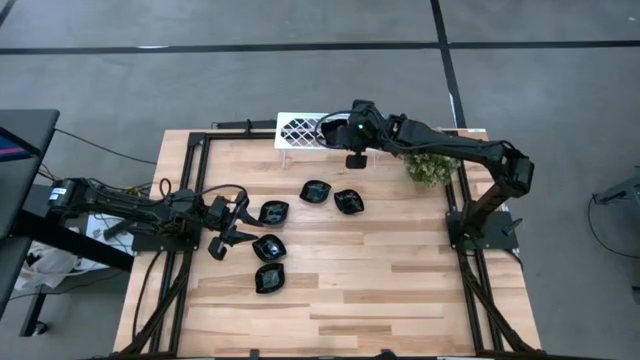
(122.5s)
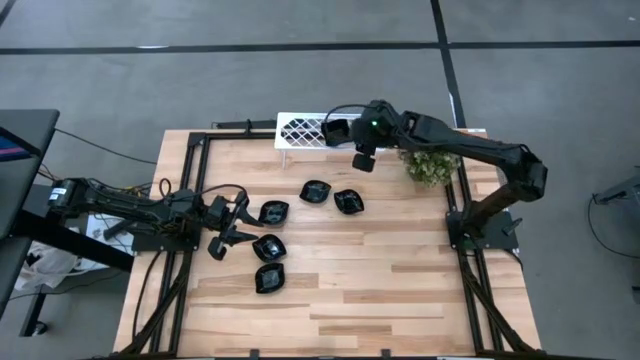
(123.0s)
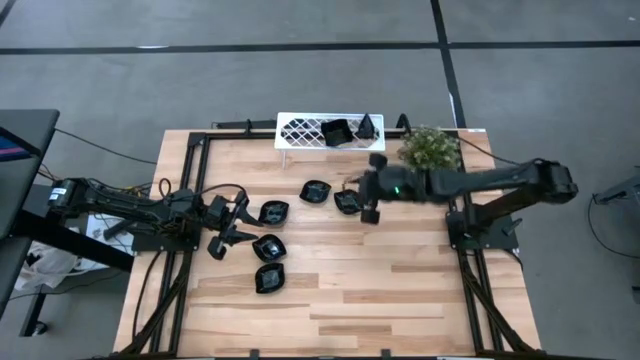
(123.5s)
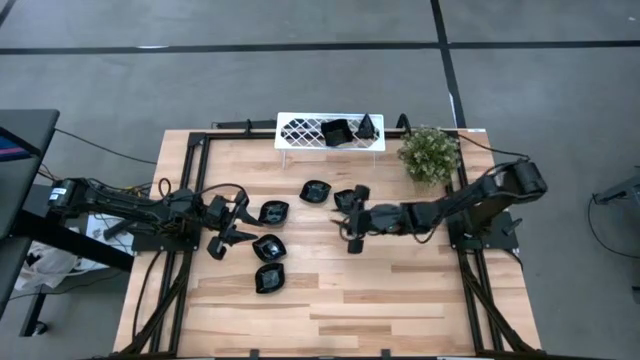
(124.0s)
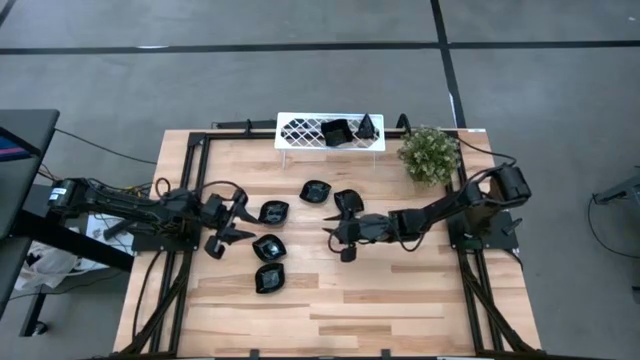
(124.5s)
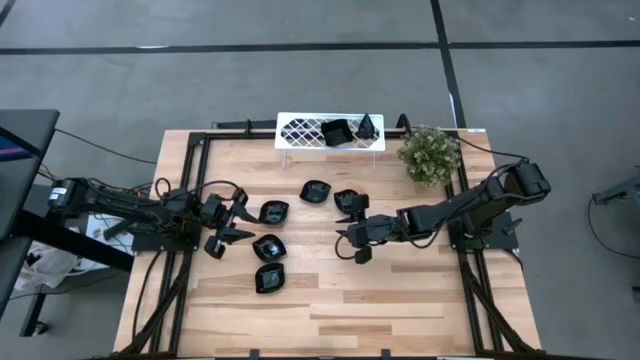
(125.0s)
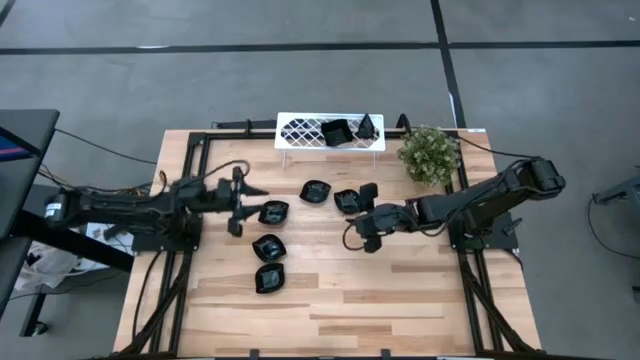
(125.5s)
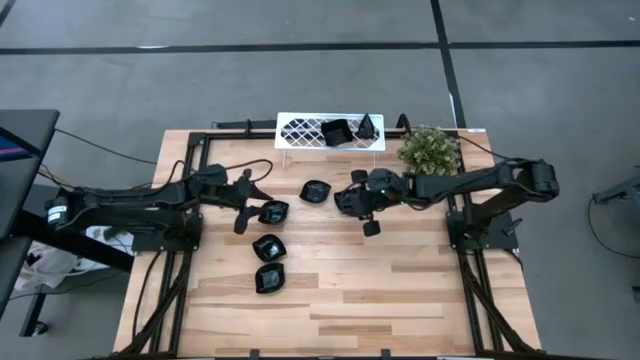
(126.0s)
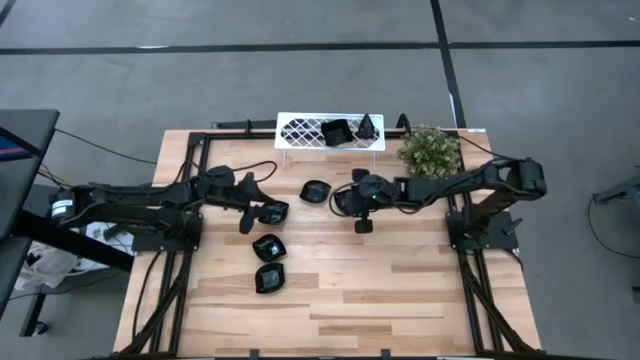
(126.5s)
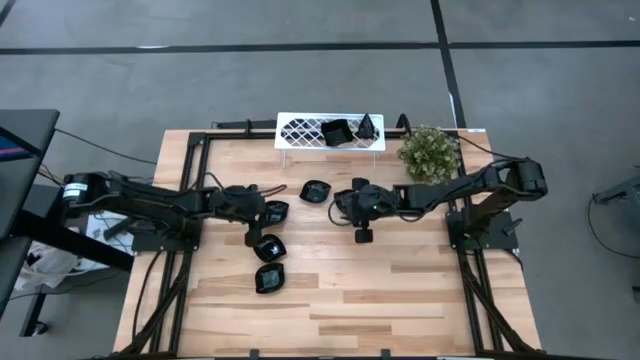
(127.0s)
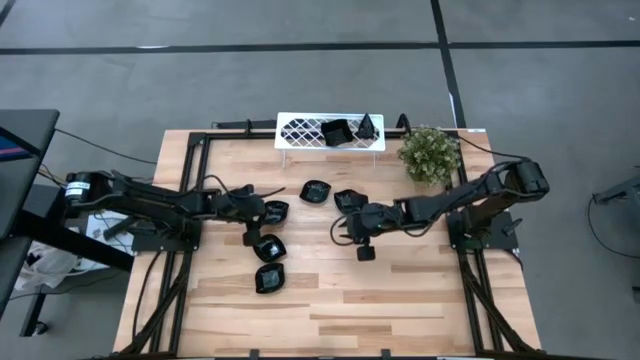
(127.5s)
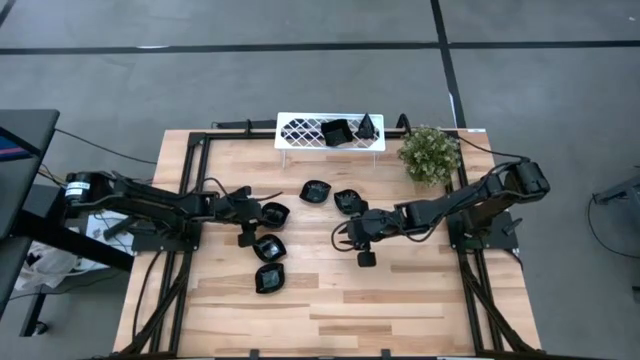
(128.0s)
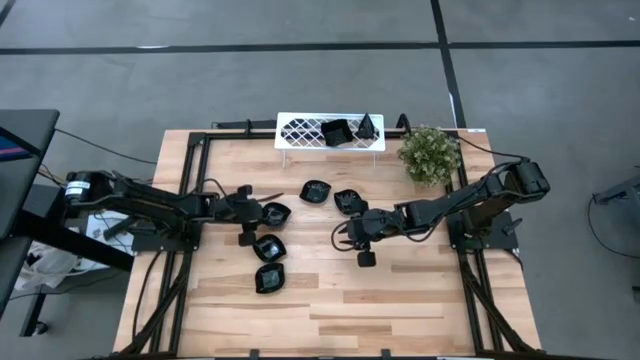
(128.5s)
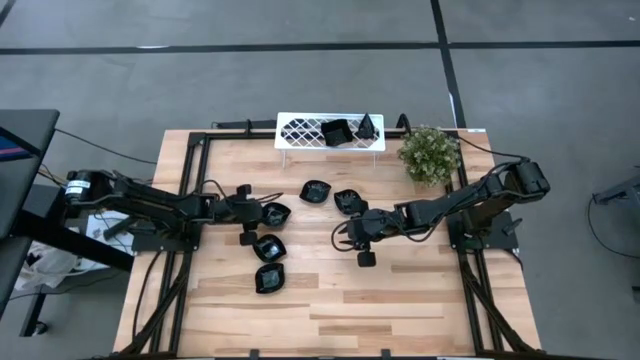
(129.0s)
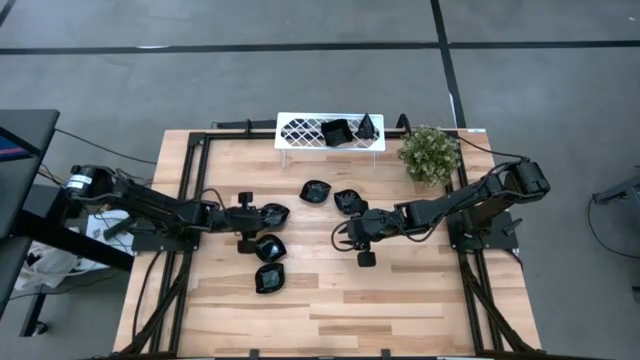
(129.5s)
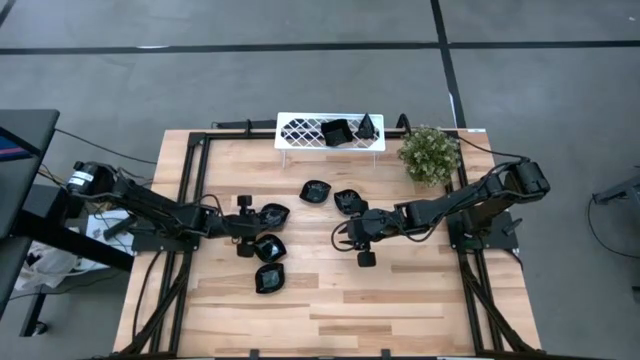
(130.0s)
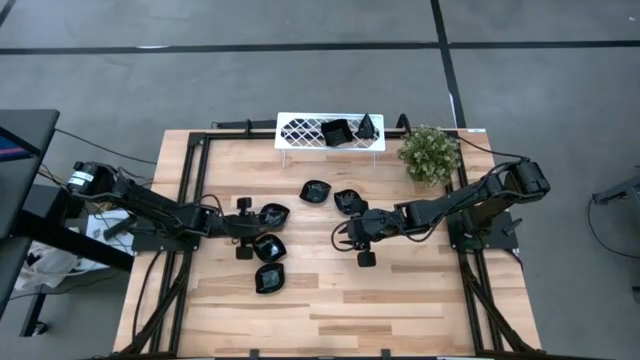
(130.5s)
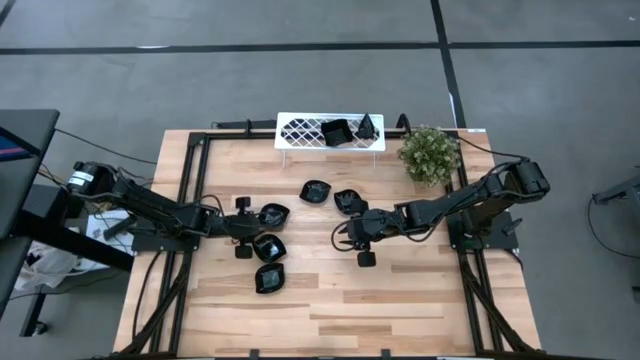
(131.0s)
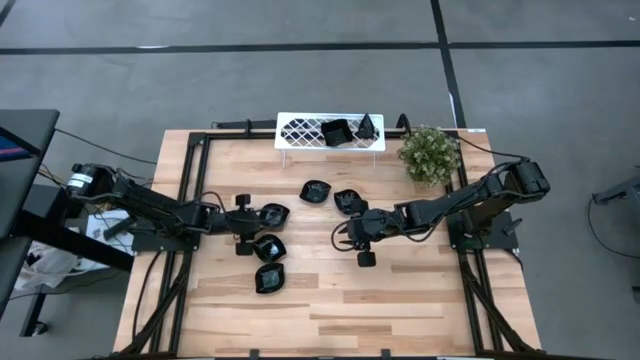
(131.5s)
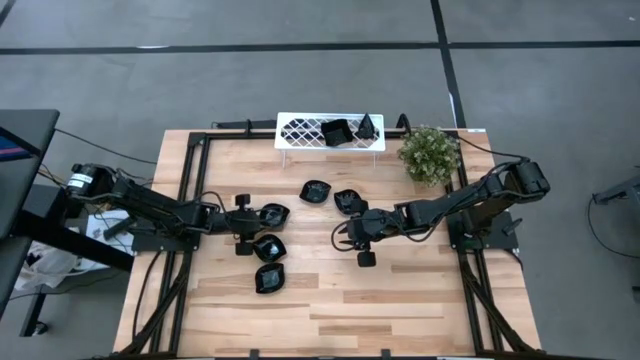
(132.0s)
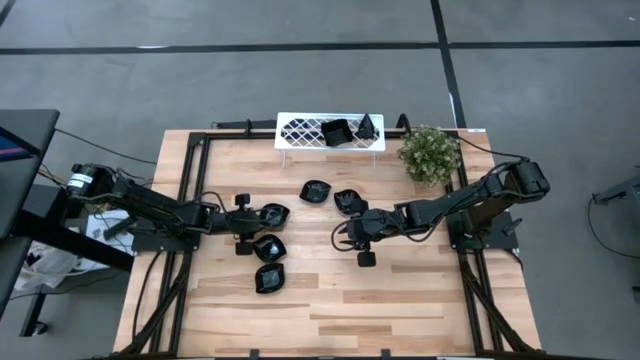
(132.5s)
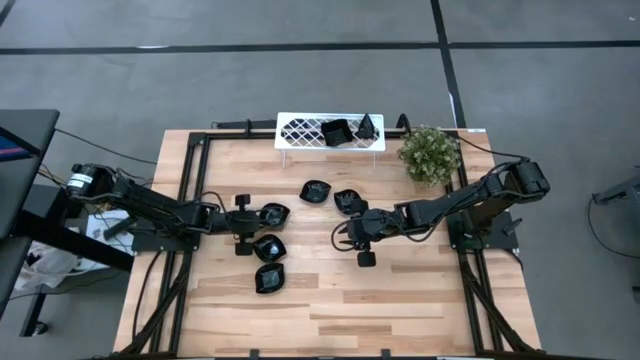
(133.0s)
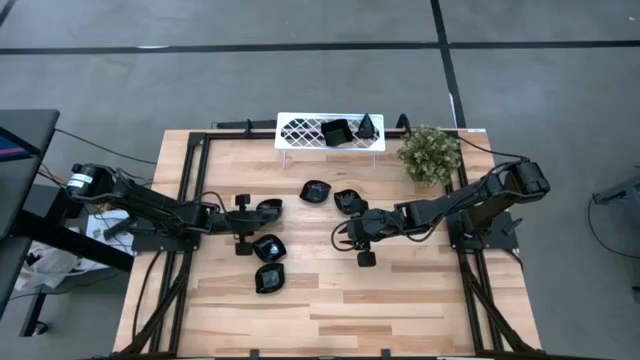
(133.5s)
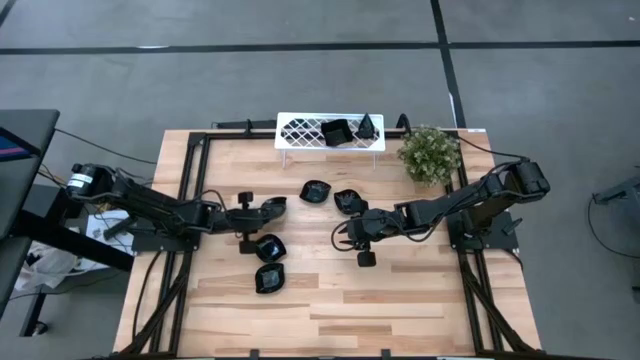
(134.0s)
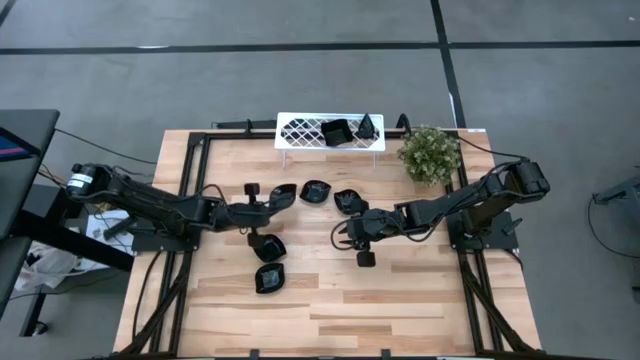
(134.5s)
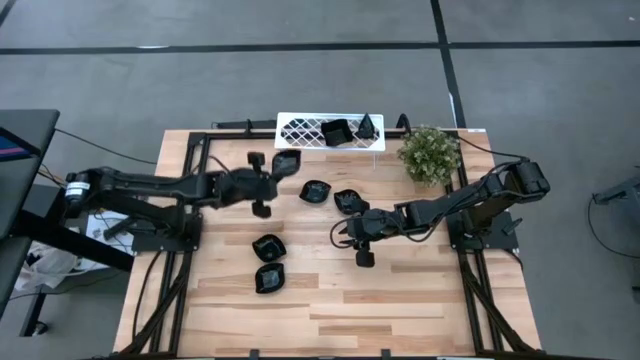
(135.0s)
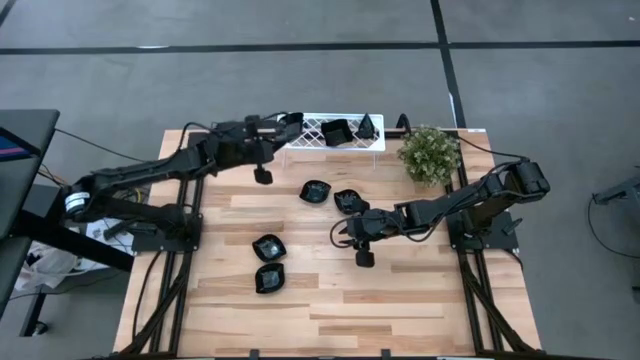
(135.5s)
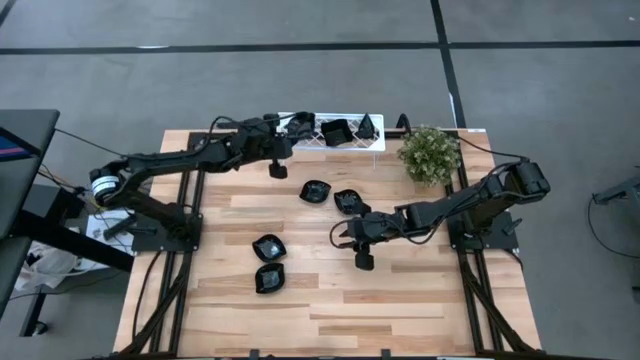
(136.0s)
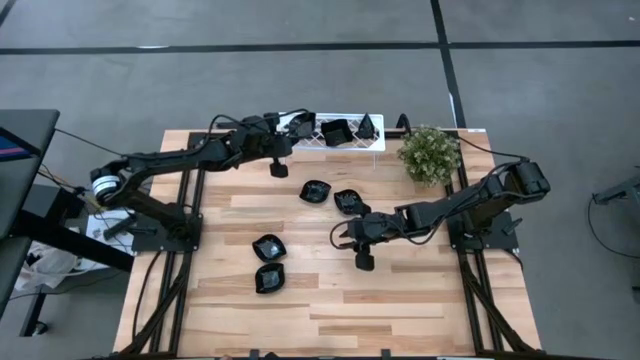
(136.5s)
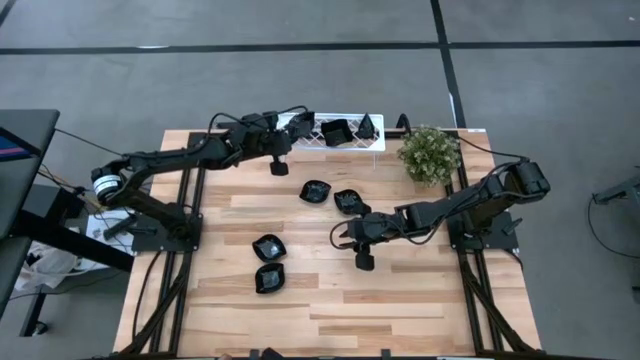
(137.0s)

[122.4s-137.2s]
Task: Pick & Place Mini shaped plates
Put the leaf-shaped plate on the shelf

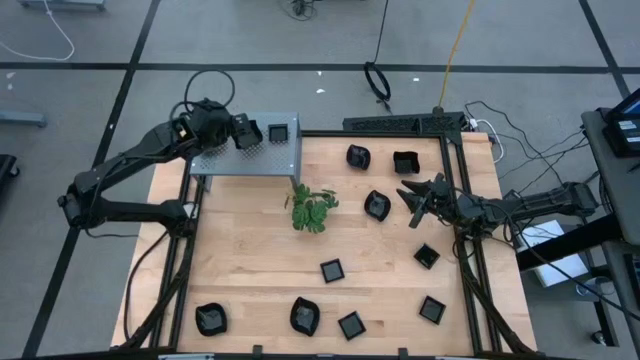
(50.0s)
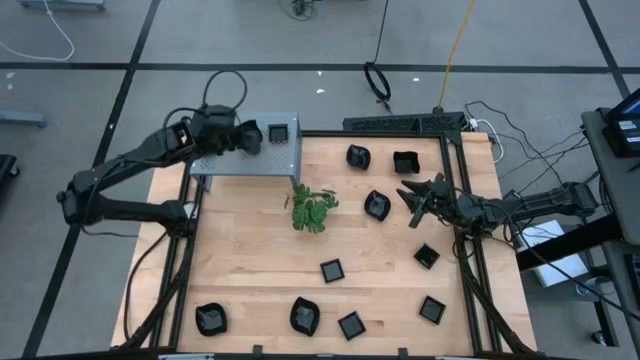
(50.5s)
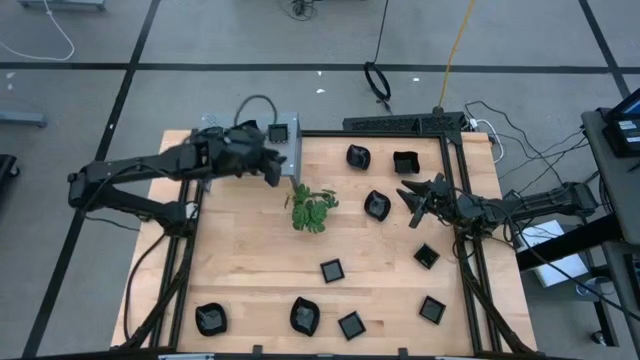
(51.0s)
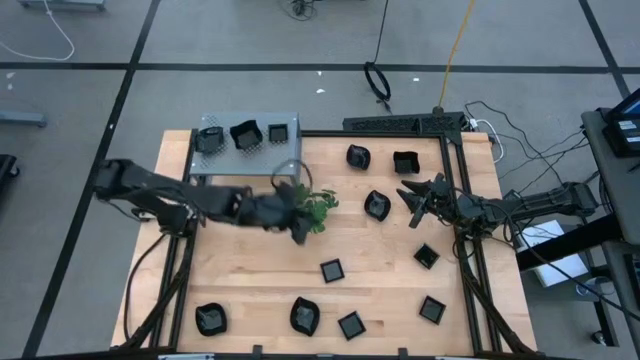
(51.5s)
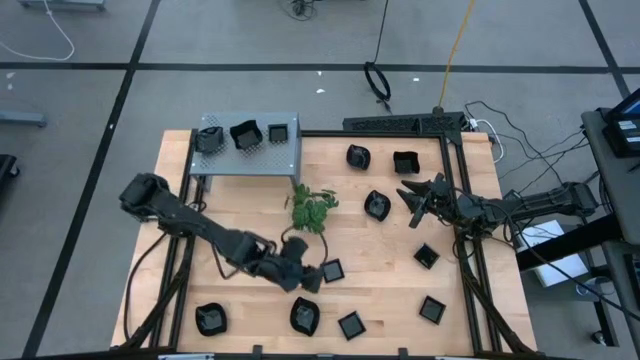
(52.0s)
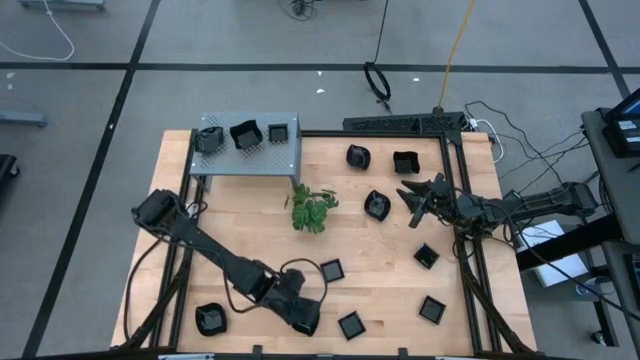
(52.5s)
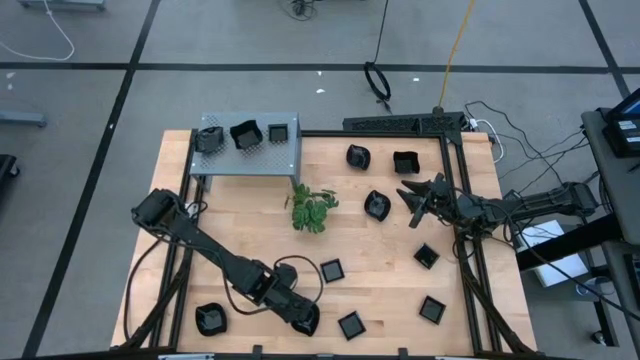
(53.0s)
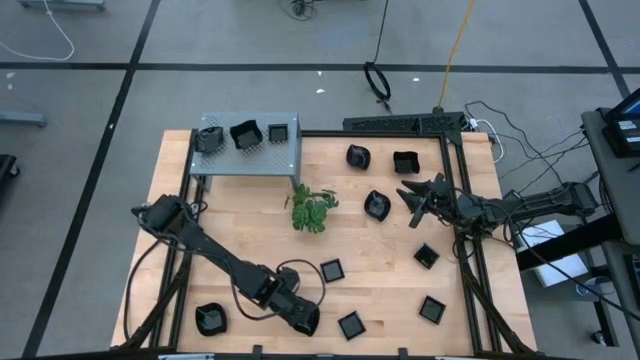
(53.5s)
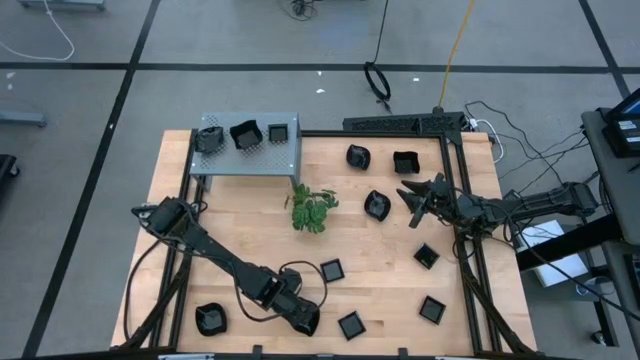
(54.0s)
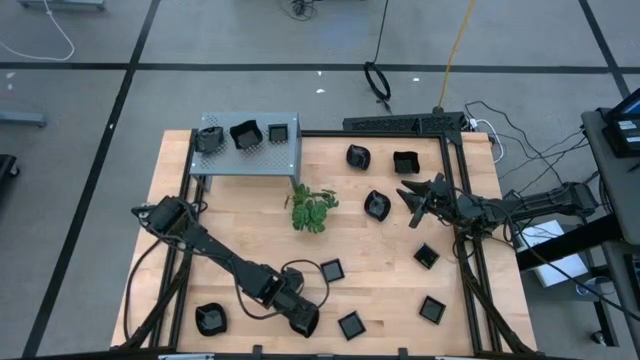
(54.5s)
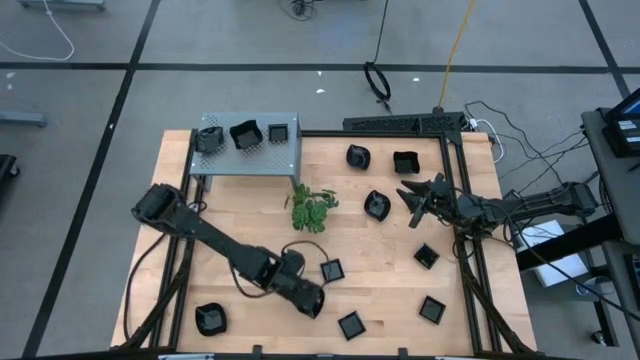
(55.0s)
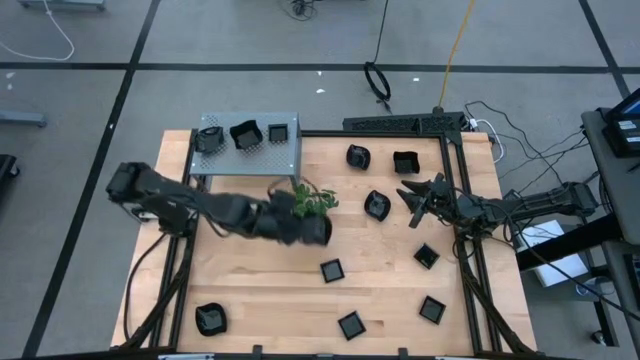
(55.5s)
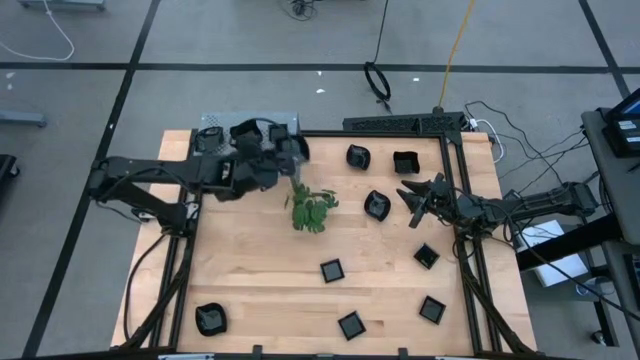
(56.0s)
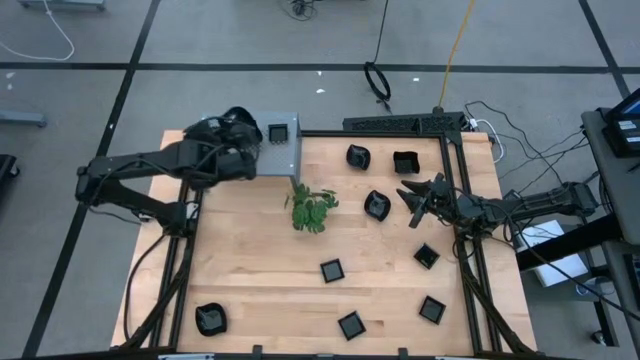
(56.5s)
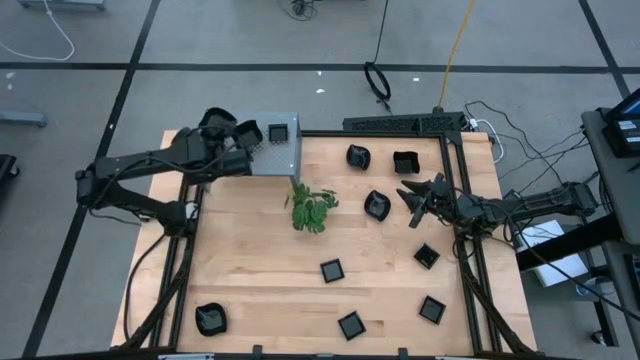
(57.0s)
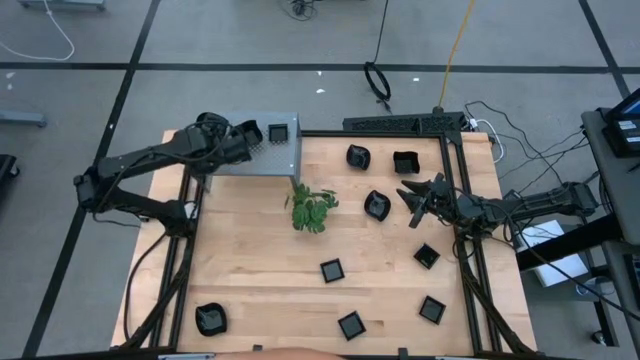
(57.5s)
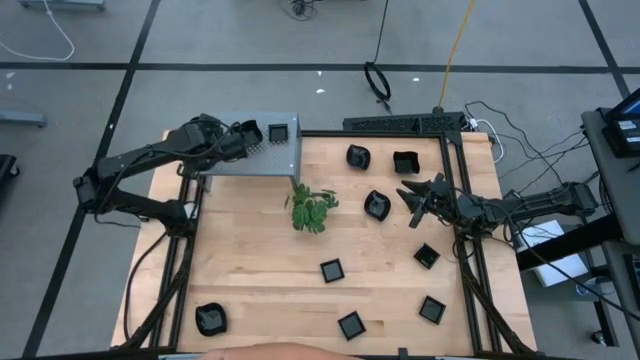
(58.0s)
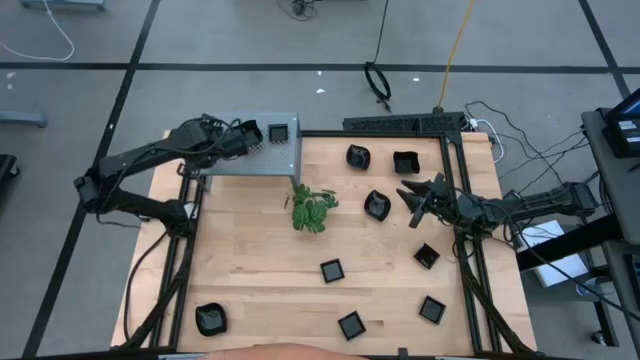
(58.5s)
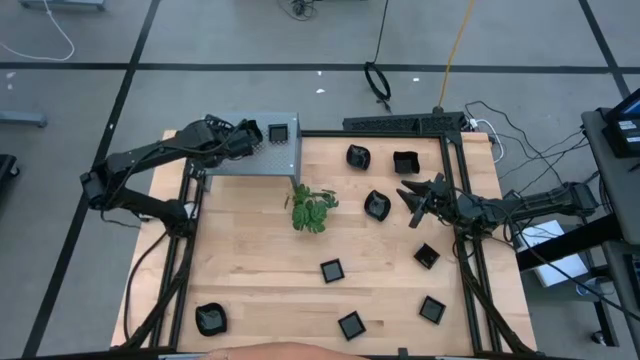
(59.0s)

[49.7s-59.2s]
Task: Pick & Place Mini shaped plates
Stack the leaf shaped plate on top of the leaf shaped plate on the shelf
